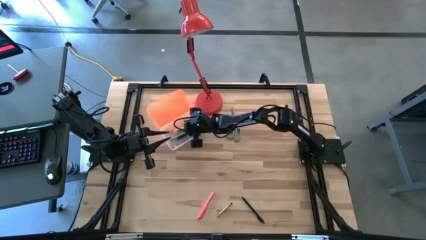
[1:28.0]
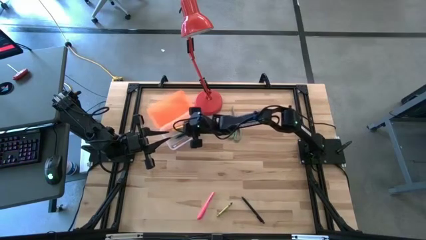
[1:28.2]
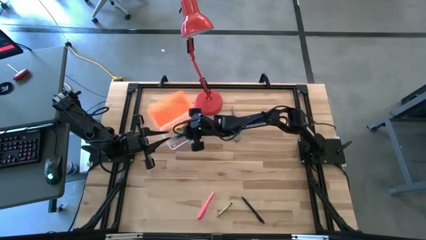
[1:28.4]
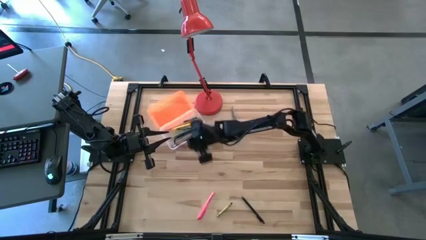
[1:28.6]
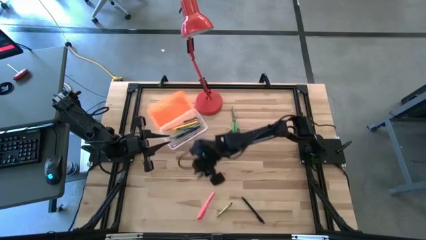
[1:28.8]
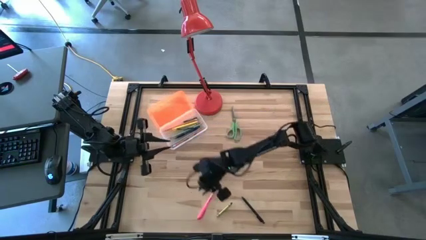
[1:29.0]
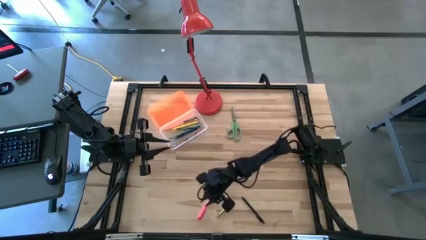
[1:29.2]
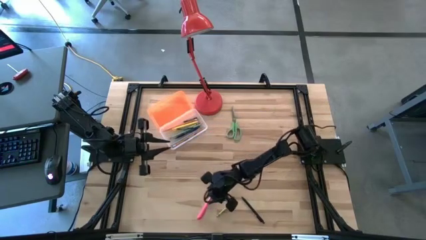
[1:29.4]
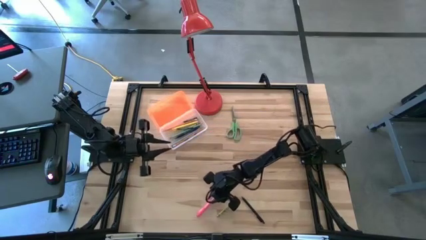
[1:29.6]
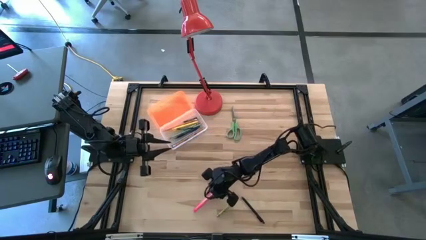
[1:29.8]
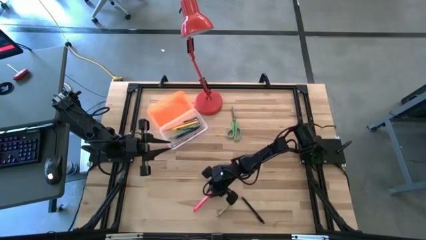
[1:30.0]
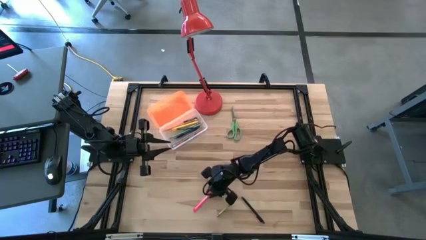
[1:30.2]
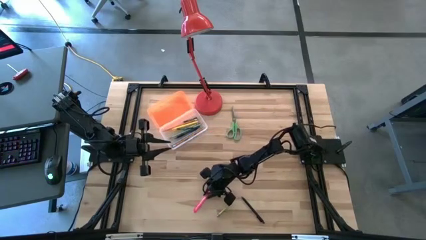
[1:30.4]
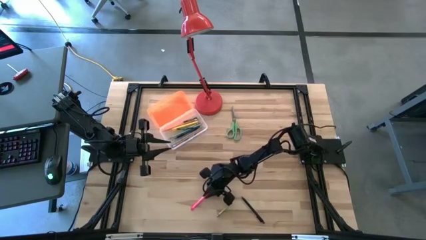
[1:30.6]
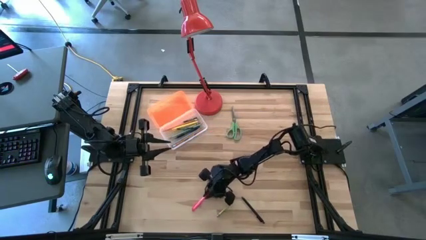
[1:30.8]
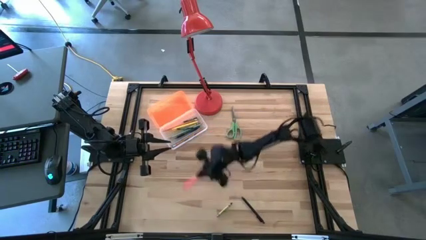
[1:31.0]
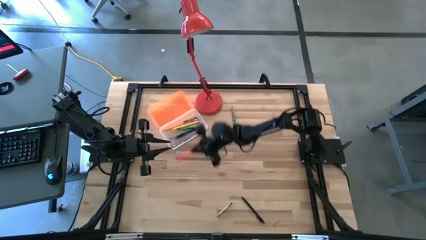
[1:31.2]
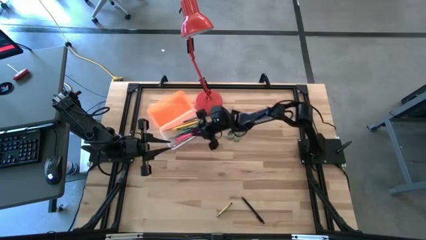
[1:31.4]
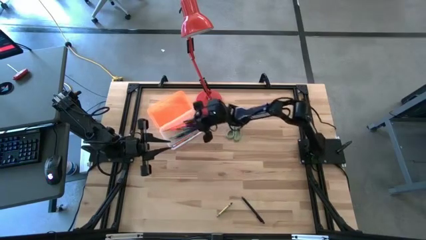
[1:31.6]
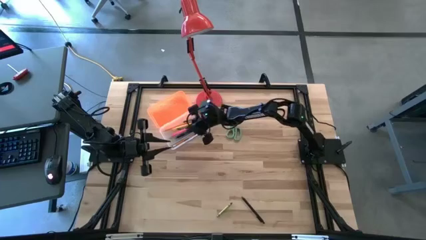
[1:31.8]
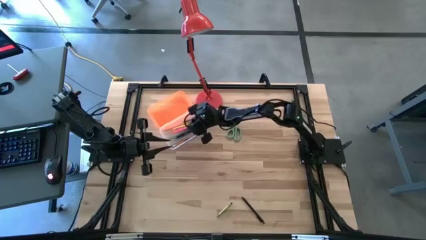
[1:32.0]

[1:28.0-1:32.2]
Task: Pick & place school supplies into a supply box
Put the pink pen into the orange supply box

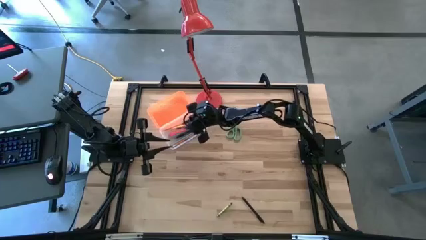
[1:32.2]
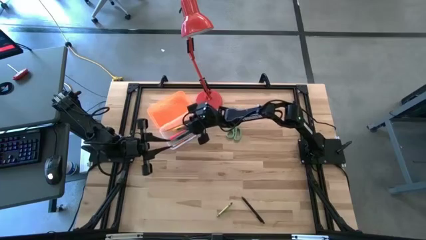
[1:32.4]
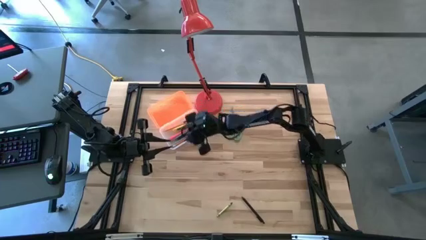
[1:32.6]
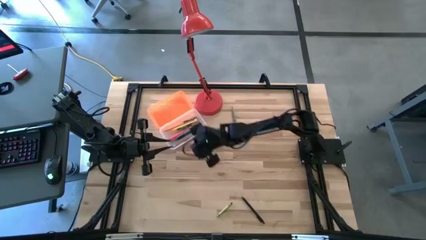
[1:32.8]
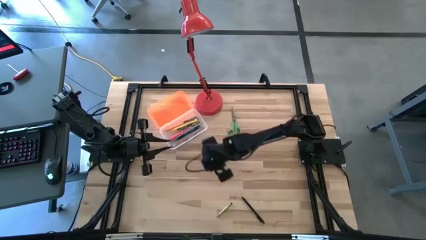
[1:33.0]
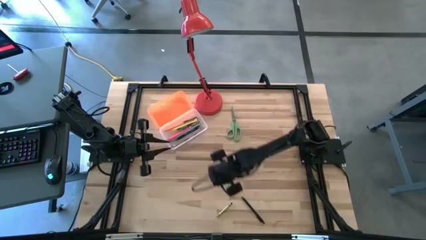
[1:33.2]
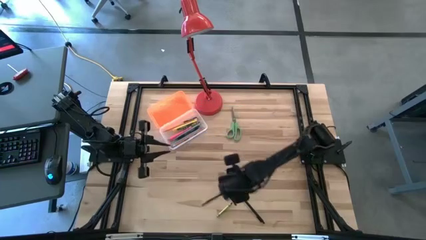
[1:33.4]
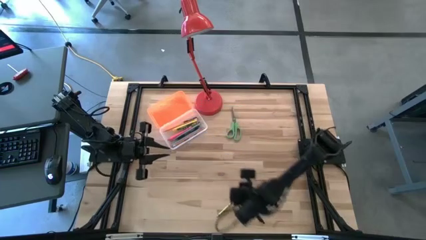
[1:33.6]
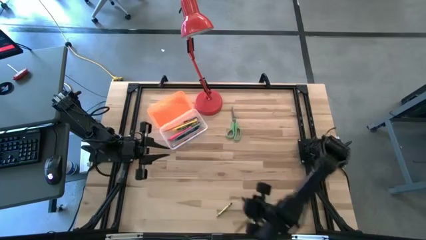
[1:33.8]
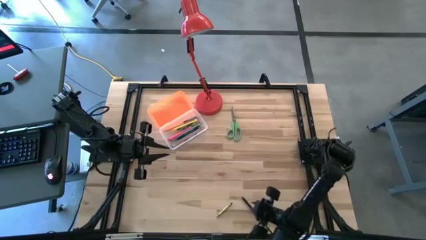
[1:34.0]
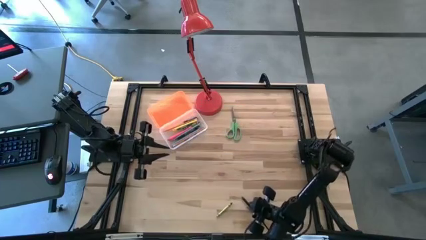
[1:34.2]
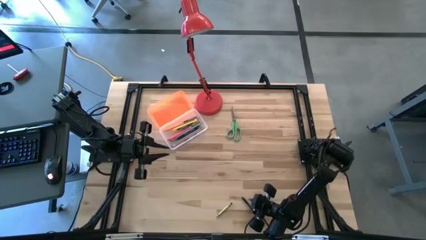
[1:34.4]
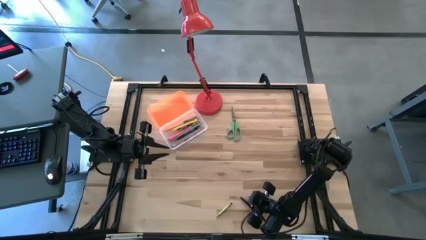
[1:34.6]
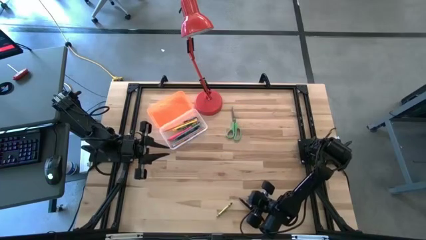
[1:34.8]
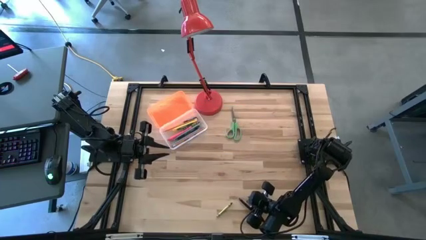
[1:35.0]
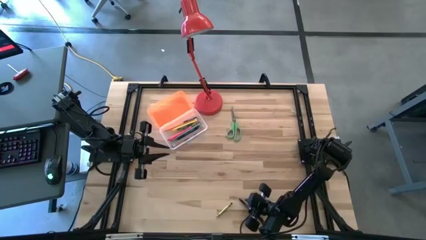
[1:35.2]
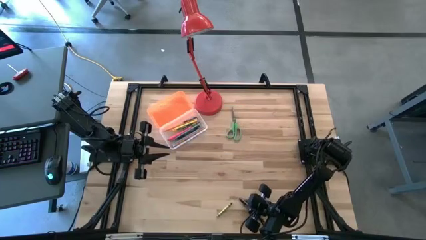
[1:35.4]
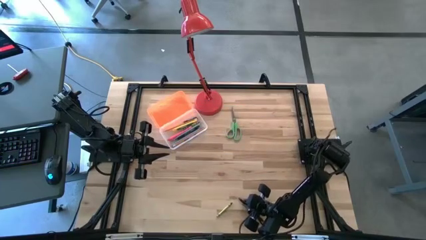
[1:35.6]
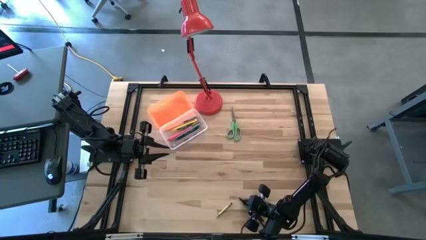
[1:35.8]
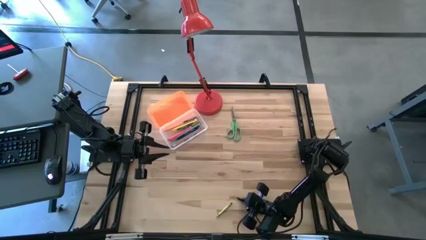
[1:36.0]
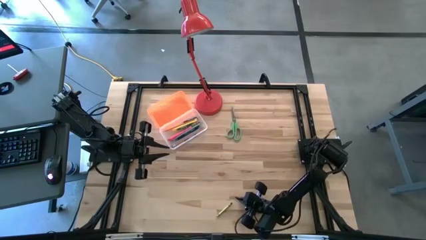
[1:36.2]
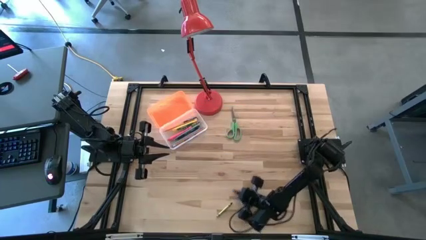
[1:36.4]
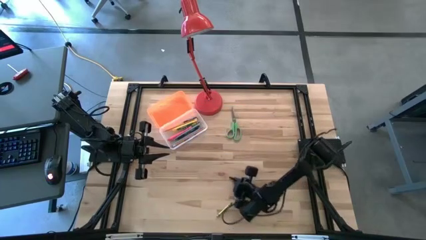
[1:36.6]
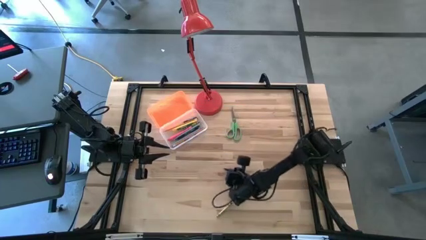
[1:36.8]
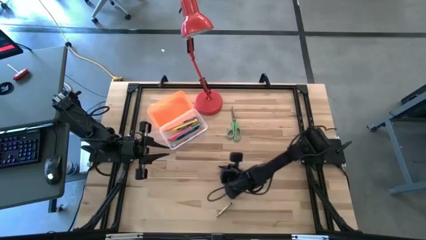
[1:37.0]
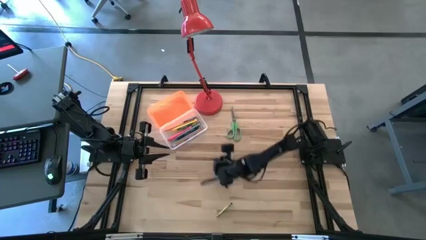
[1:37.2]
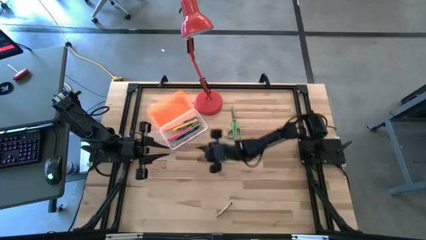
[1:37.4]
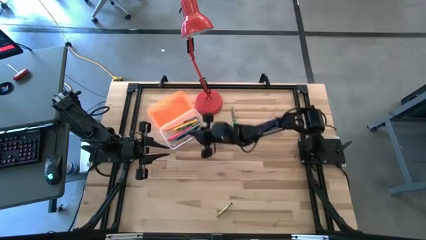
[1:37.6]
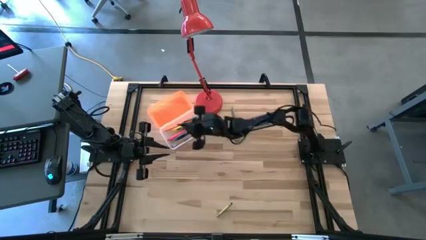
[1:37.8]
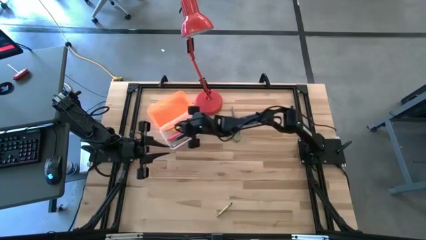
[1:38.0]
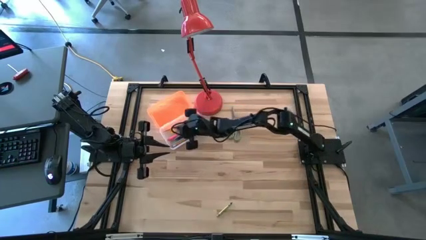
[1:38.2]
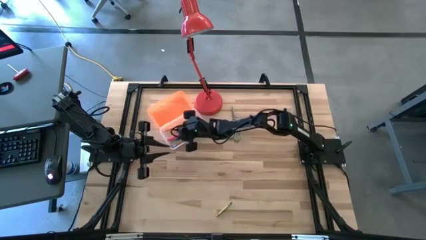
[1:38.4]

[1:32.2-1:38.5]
Put the black pen into the orange supply box

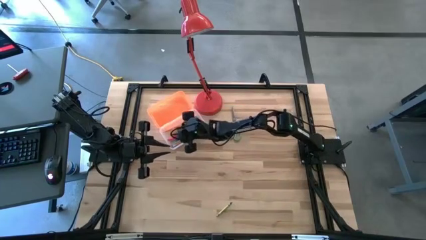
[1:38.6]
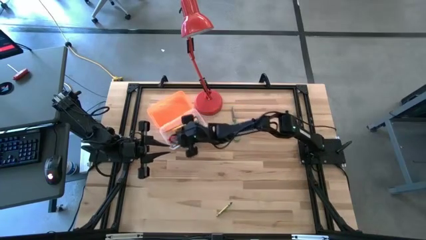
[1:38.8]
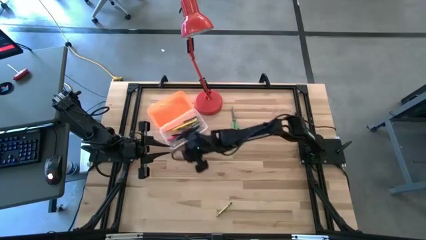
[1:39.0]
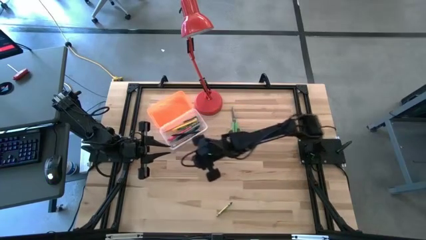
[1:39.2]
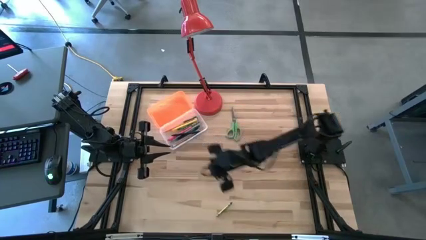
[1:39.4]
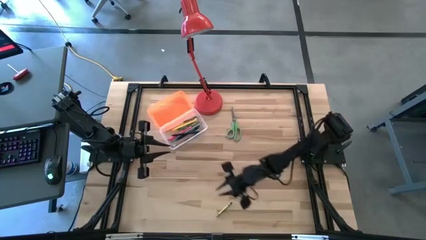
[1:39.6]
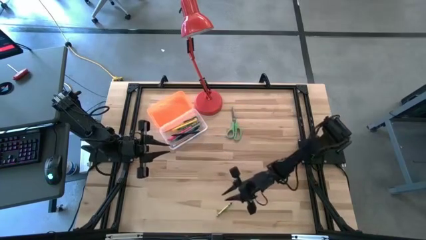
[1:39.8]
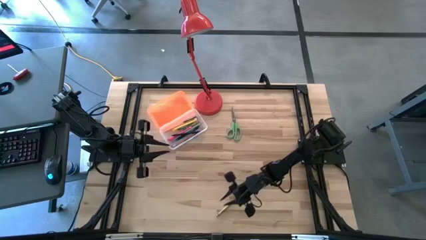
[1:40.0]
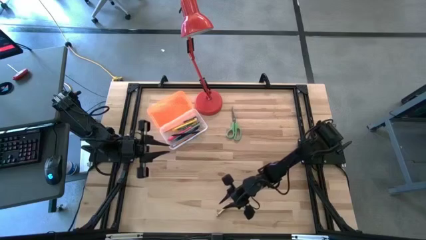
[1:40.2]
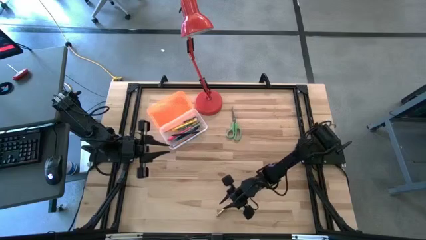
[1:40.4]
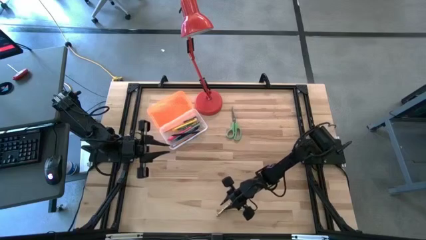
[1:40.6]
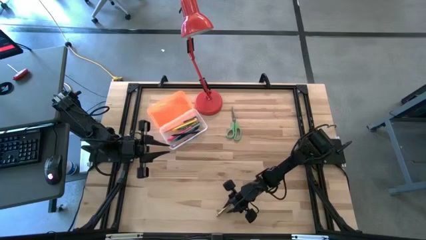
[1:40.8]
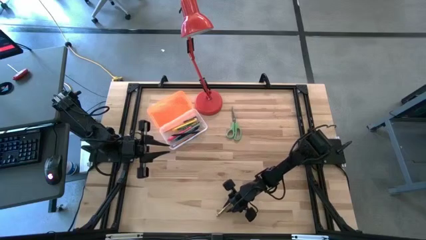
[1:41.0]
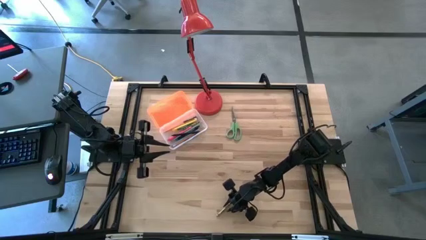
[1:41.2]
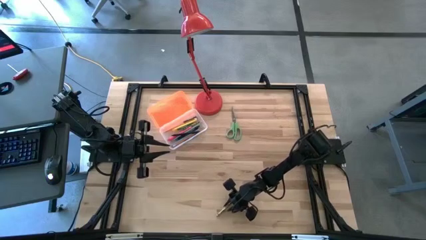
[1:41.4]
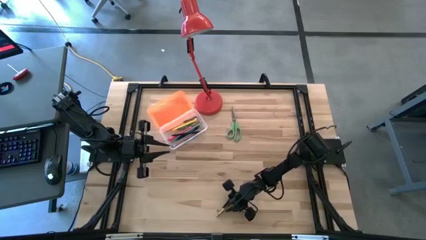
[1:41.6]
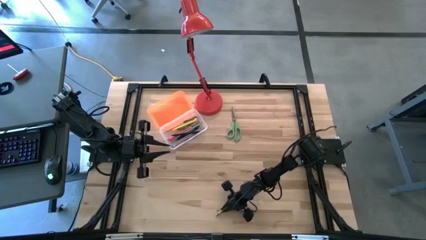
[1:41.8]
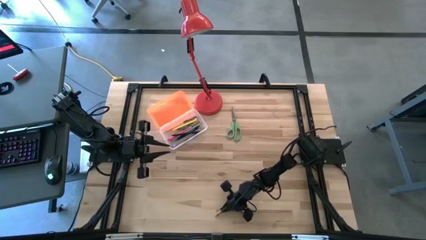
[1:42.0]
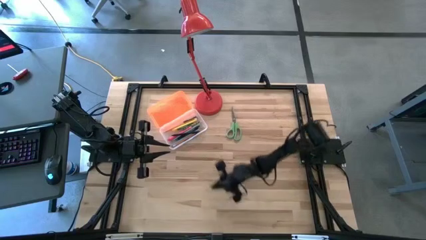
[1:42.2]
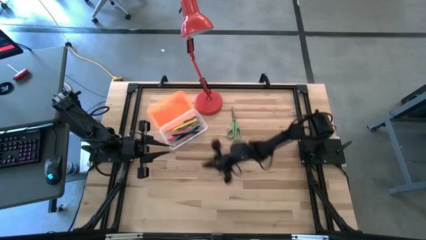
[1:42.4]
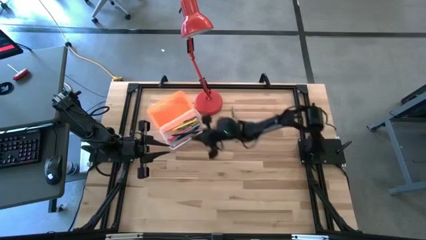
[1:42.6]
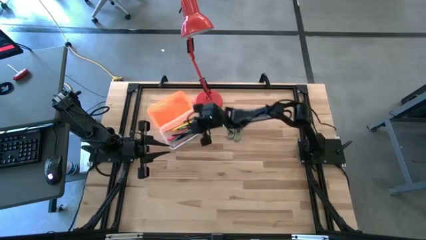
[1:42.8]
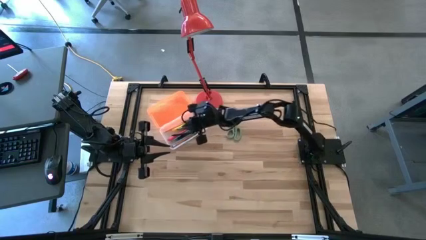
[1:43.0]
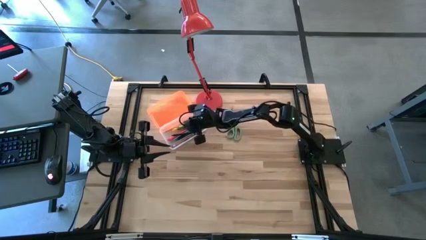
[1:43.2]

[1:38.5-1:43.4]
Put the light green crayon into the orange supply box
